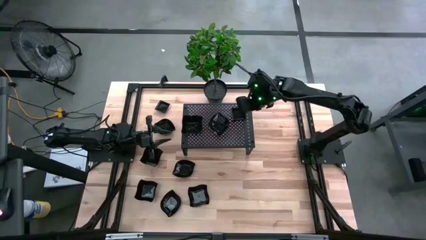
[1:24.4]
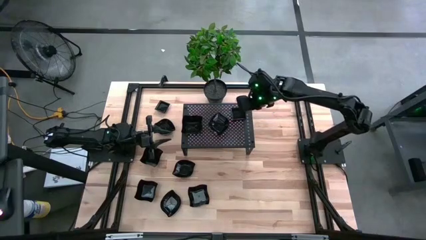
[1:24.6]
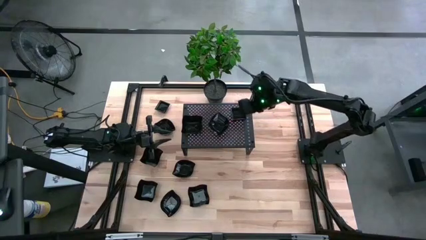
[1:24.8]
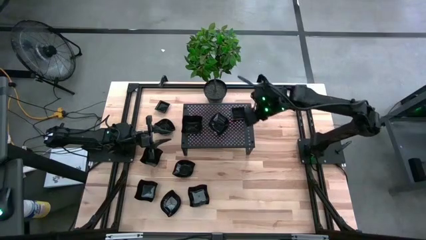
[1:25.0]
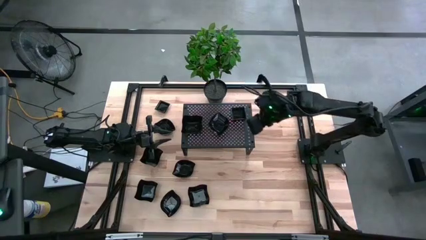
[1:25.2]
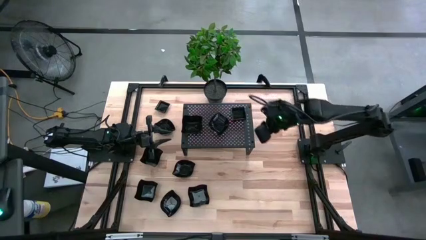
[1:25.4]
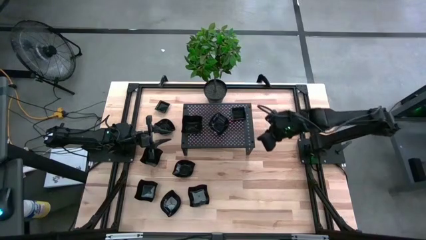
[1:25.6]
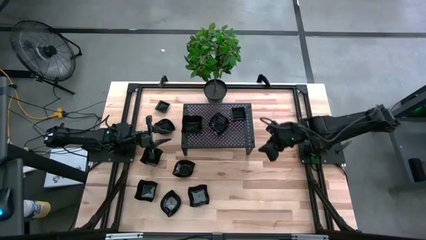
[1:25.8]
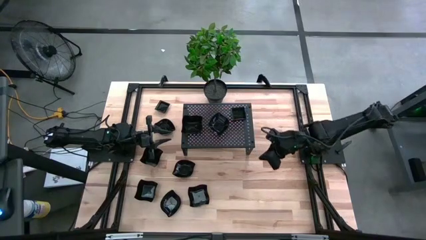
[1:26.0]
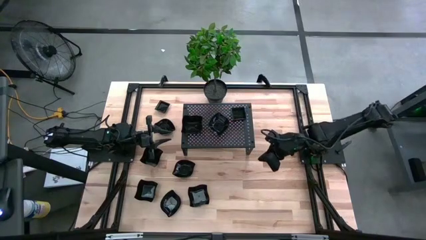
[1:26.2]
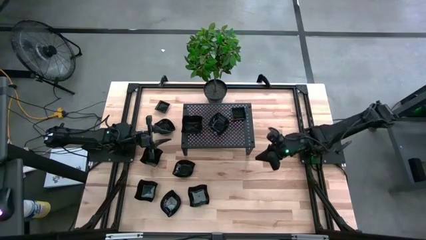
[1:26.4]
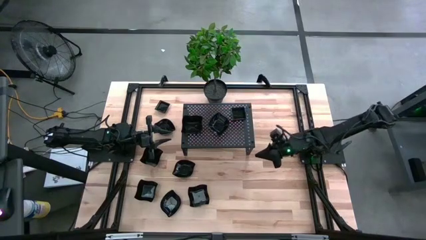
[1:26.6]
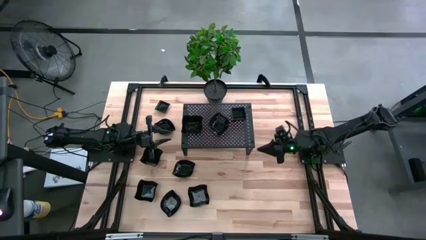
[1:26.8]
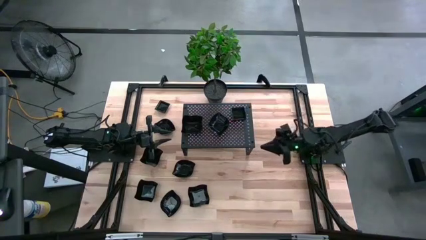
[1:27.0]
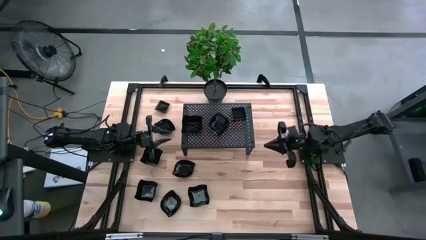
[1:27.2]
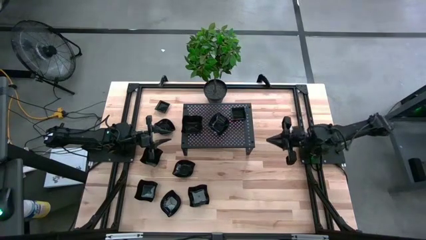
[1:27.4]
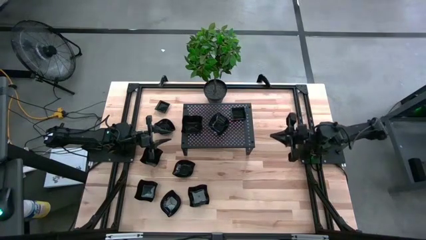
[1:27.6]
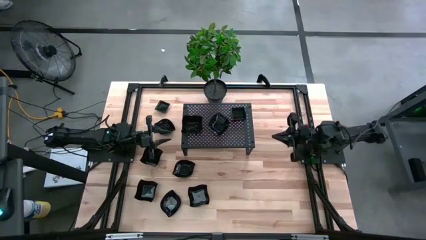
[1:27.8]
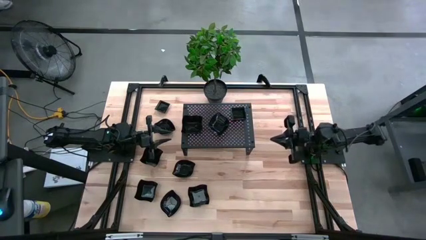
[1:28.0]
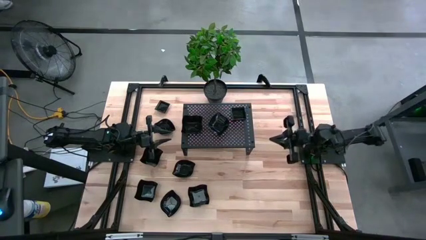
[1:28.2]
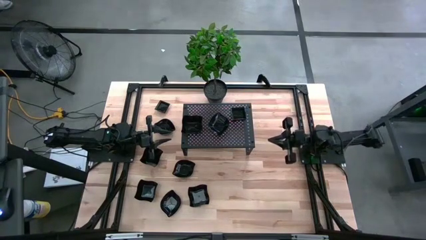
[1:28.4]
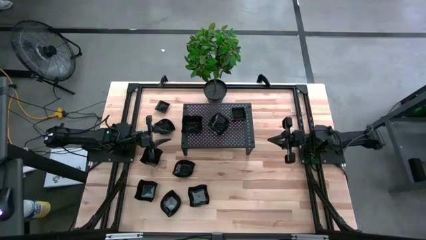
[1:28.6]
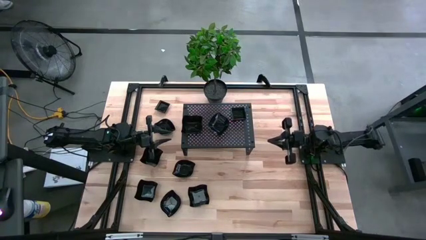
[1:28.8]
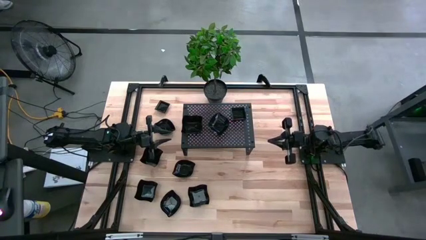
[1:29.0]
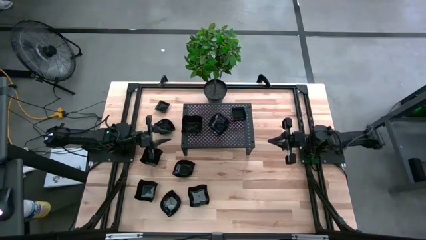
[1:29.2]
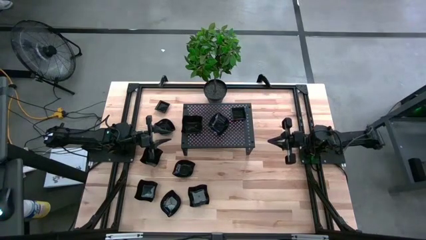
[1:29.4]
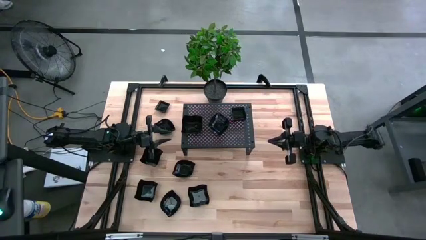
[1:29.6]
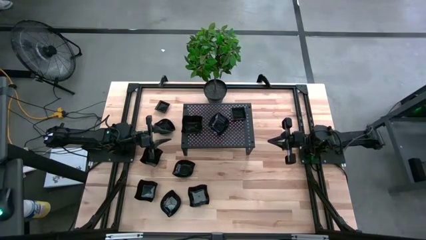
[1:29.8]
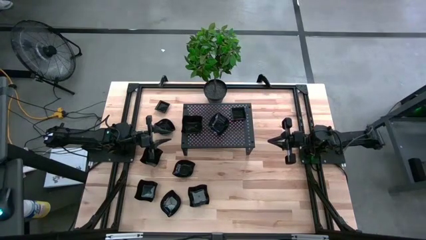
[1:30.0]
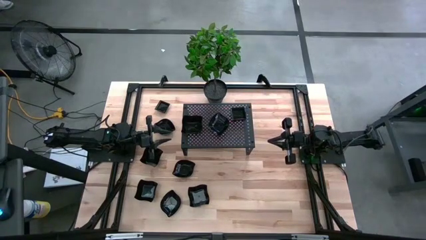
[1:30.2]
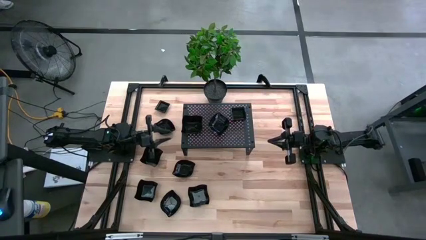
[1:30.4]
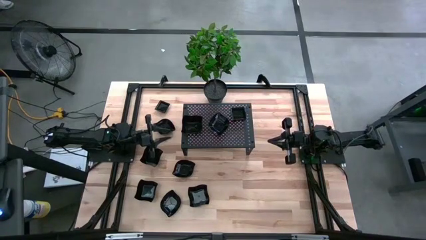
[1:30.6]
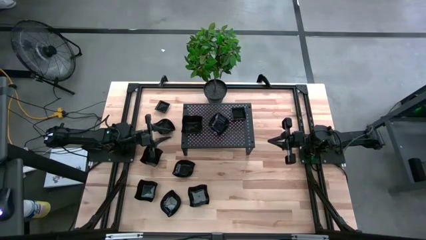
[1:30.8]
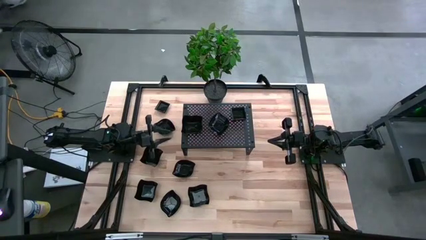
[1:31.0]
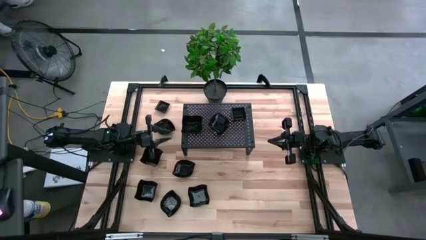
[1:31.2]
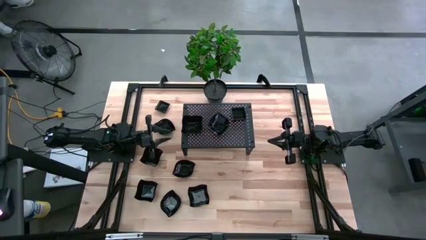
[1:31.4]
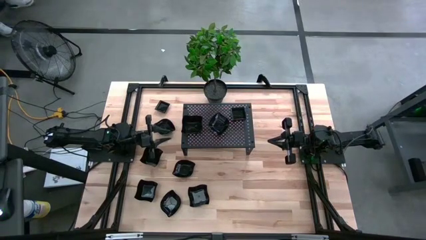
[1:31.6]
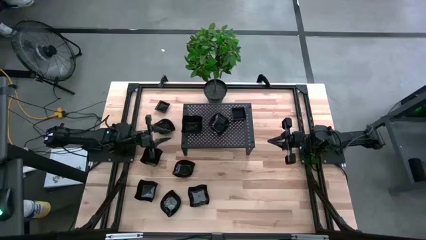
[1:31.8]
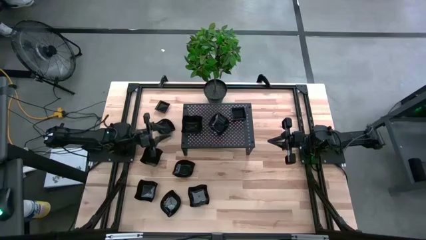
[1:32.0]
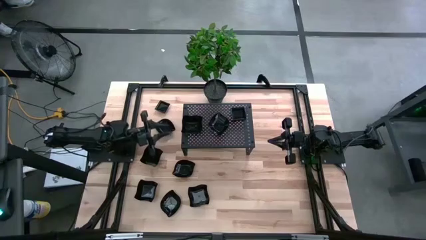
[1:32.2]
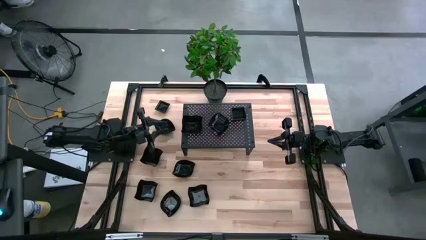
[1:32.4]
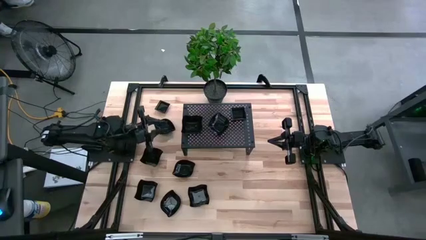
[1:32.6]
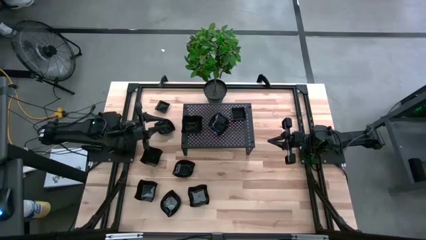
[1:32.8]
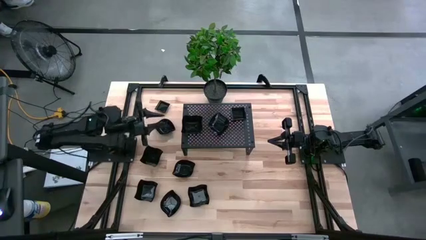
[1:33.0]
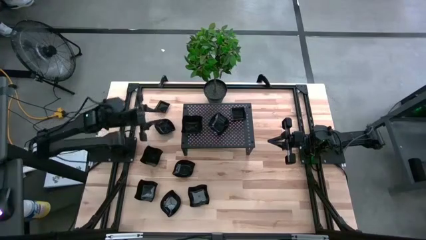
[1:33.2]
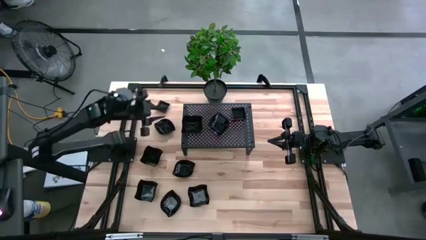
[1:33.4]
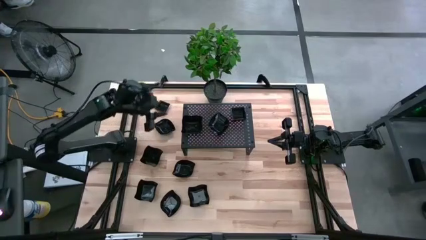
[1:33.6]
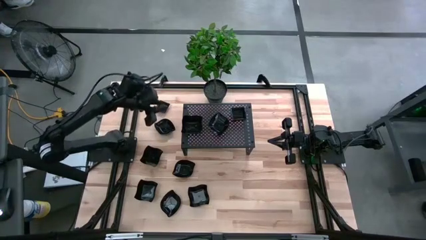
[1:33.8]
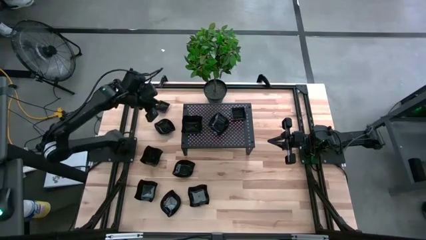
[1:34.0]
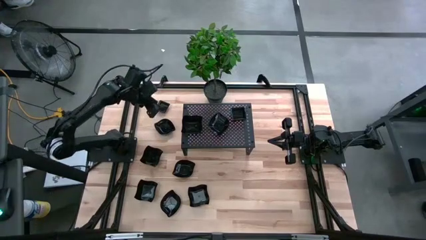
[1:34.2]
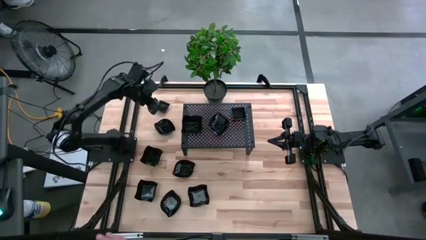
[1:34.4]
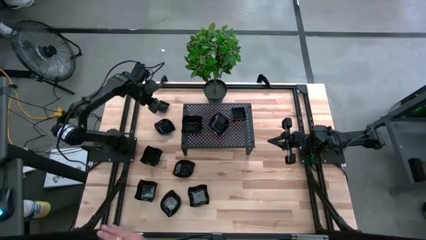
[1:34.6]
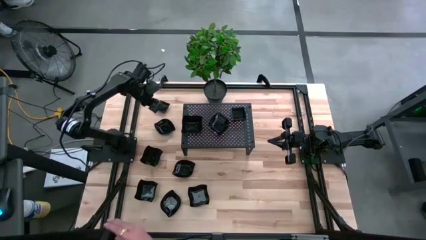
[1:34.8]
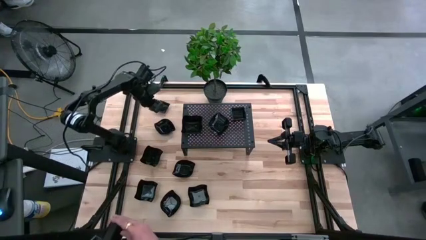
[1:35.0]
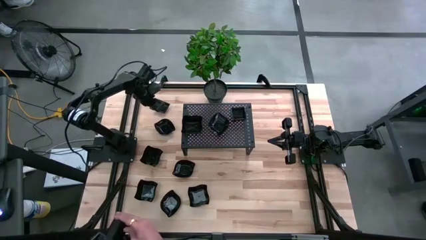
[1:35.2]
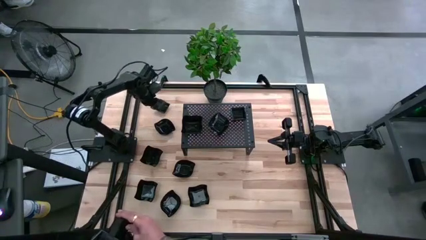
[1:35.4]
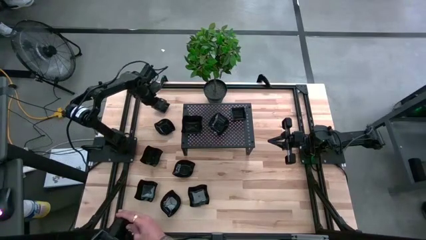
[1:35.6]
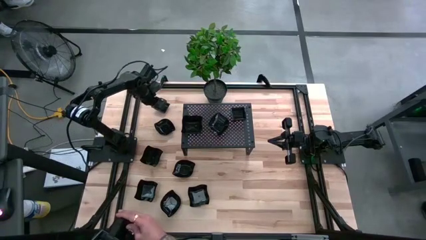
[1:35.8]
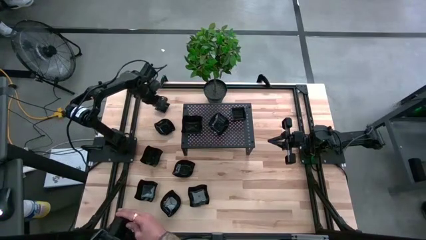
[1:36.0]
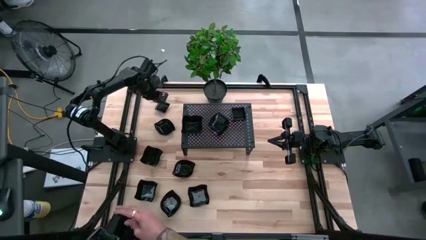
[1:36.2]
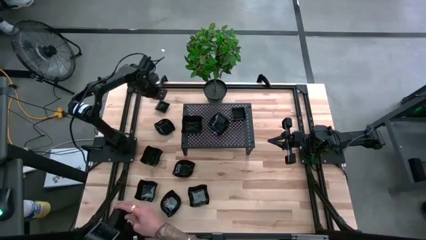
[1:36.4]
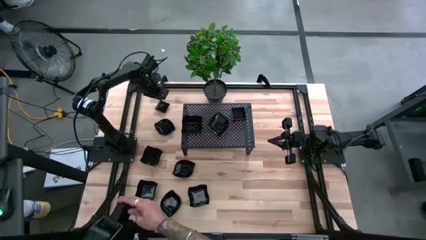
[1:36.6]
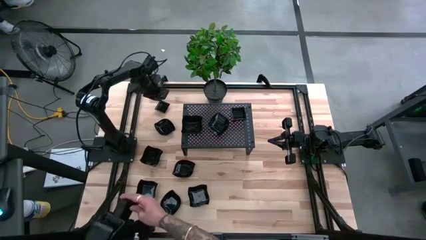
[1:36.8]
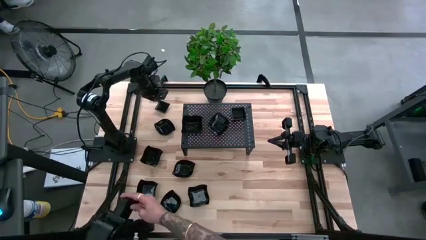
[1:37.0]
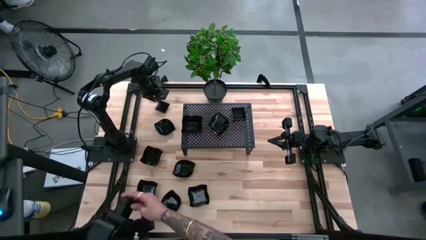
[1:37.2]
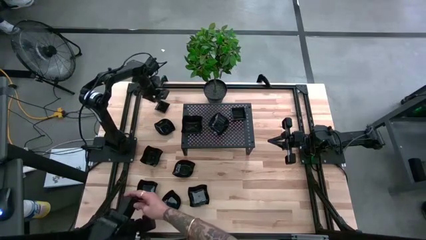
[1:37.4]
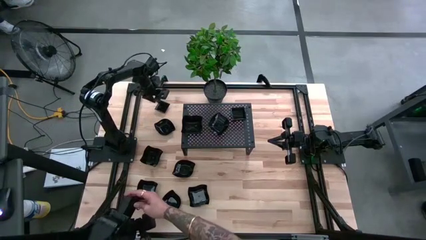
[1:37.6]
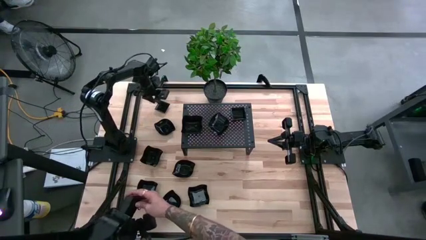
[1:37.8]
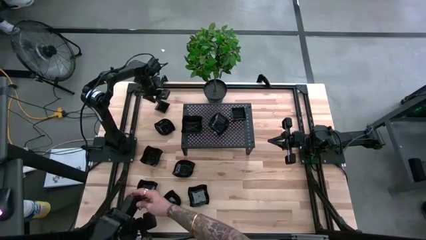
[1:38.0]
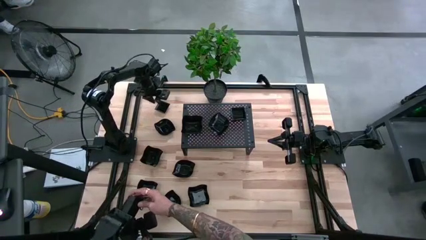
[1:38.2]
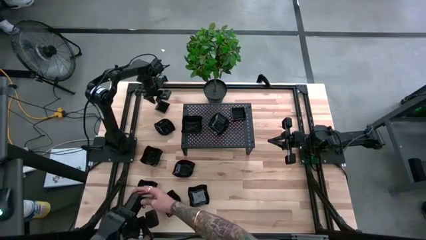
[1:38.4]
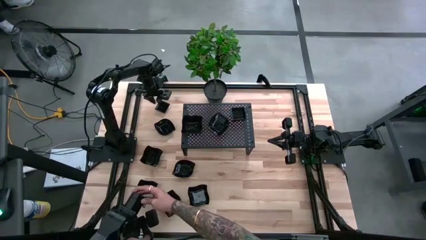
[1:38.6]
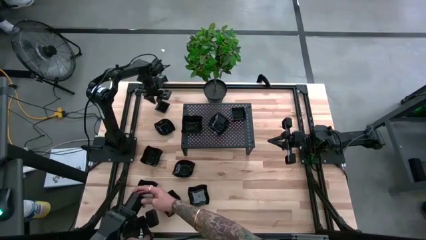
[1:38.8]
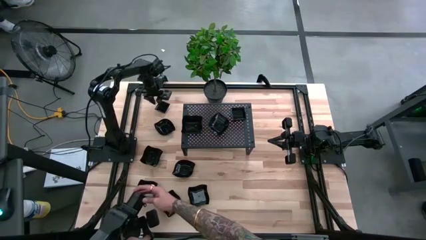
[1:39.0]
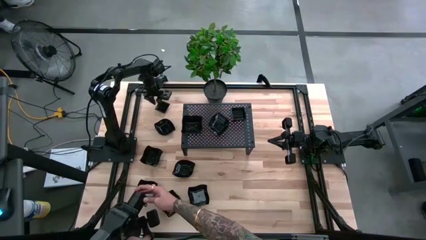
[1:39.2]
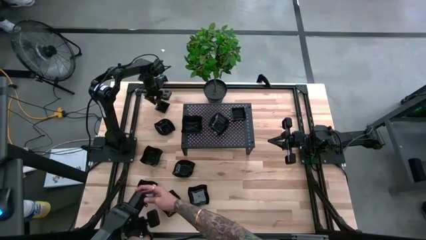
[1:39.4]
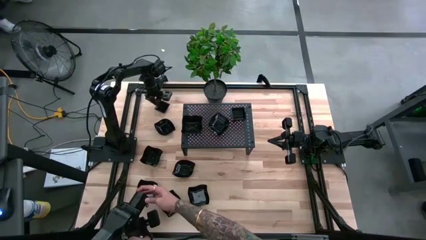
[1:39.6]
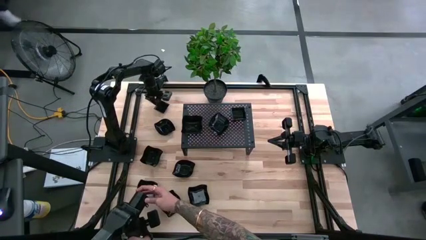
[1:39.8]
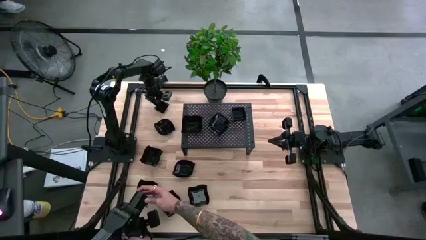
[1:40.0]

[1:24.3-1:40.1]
Task: Pick & Place Mini shaped plates
Stack the black square plate on top of the other black square plates on the shelf
